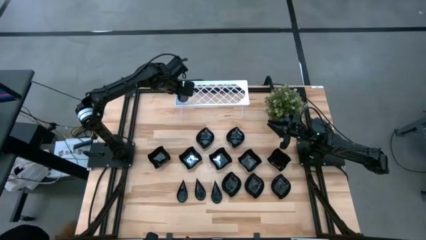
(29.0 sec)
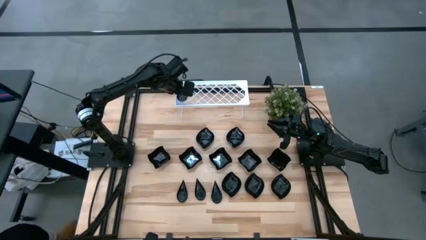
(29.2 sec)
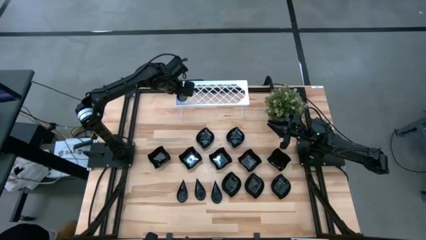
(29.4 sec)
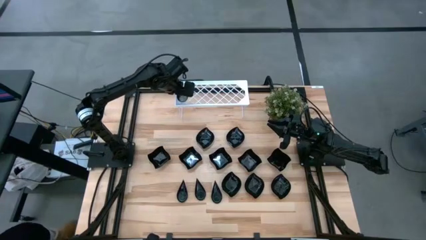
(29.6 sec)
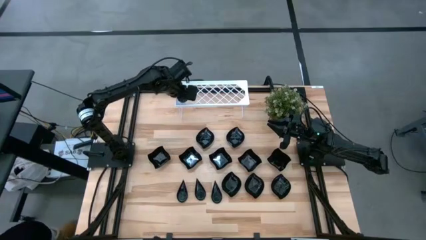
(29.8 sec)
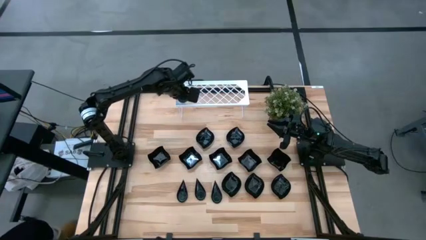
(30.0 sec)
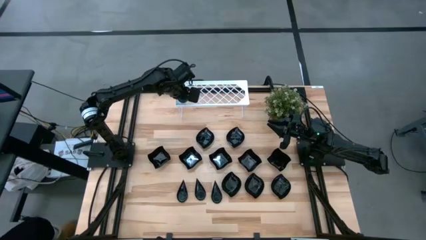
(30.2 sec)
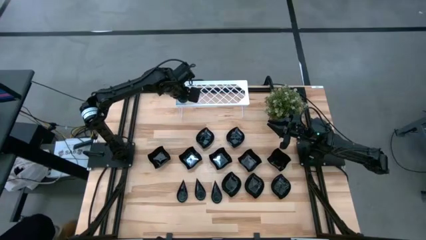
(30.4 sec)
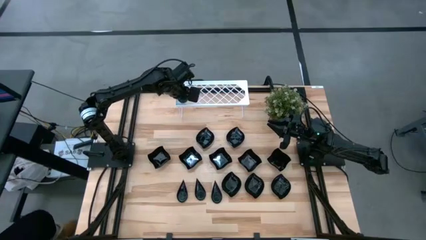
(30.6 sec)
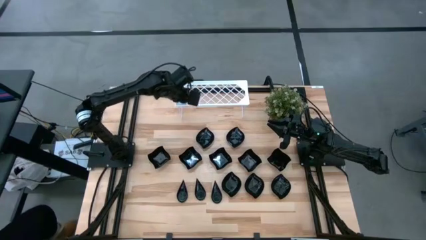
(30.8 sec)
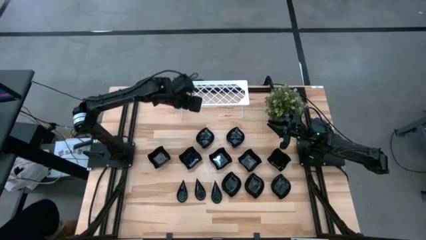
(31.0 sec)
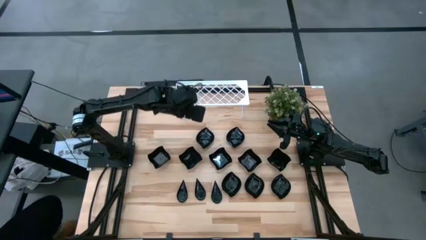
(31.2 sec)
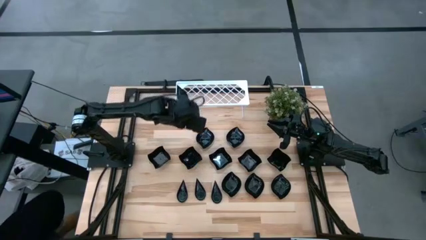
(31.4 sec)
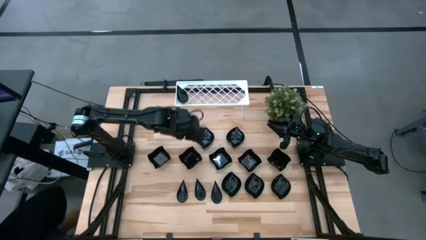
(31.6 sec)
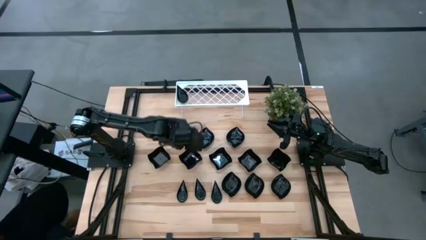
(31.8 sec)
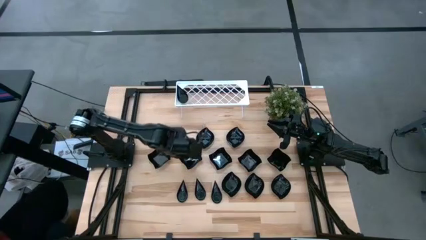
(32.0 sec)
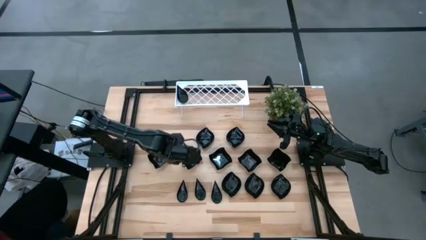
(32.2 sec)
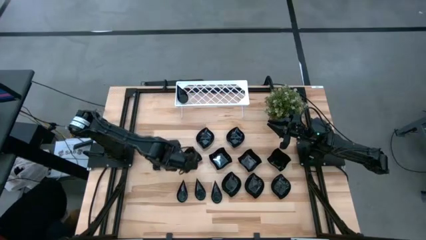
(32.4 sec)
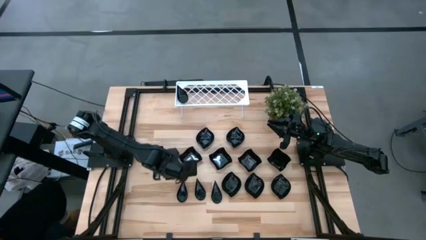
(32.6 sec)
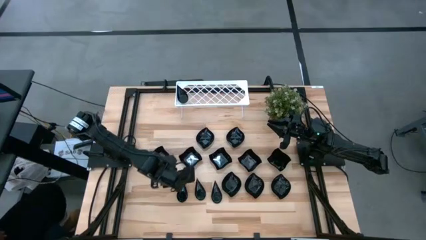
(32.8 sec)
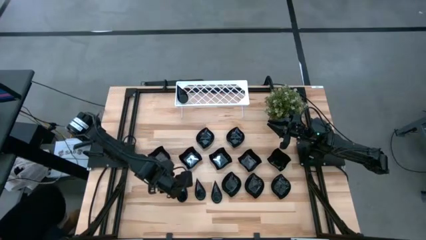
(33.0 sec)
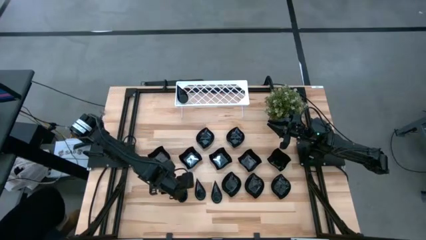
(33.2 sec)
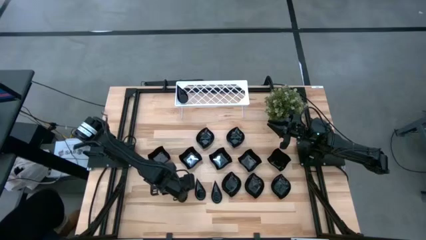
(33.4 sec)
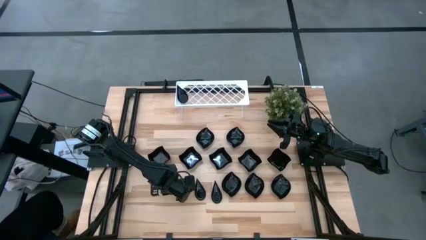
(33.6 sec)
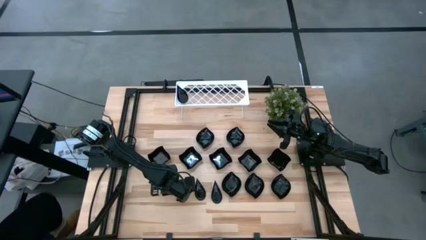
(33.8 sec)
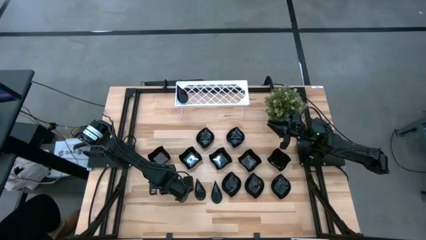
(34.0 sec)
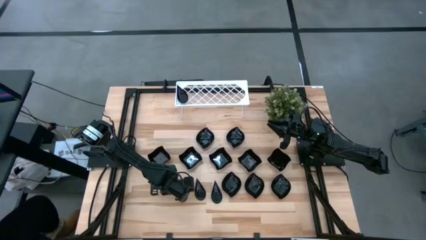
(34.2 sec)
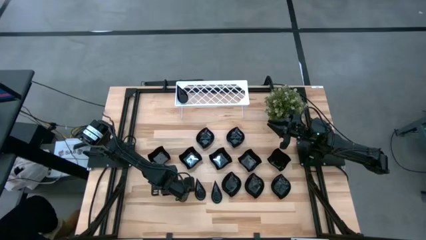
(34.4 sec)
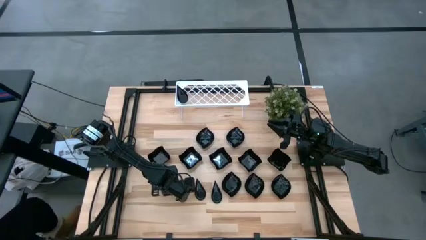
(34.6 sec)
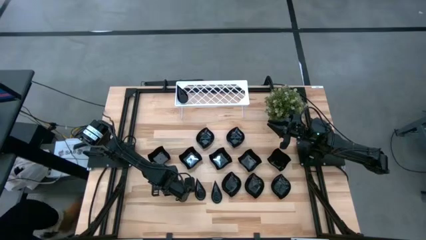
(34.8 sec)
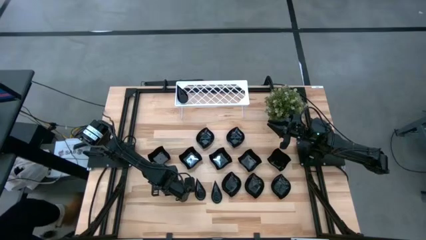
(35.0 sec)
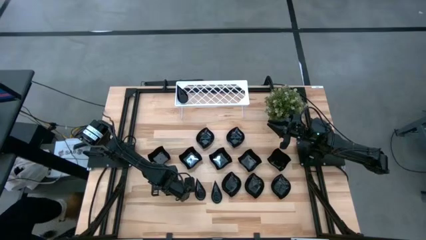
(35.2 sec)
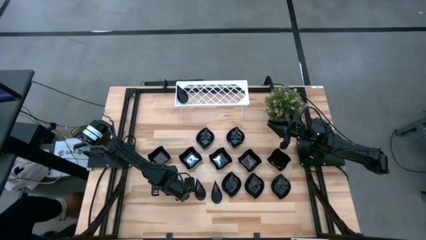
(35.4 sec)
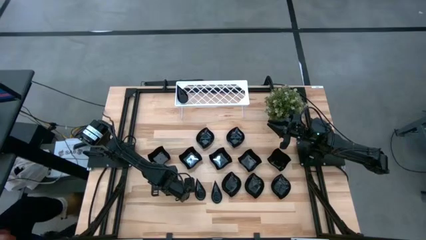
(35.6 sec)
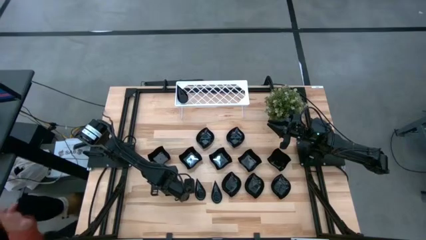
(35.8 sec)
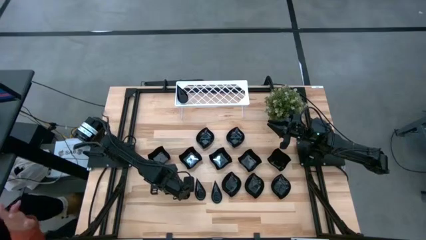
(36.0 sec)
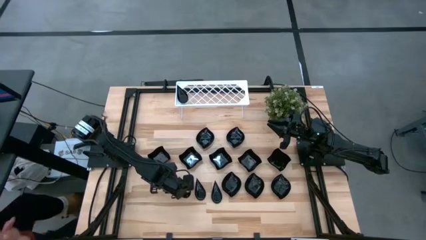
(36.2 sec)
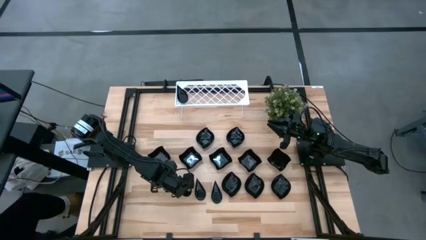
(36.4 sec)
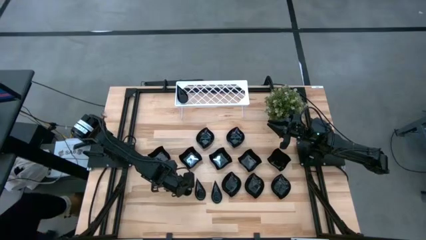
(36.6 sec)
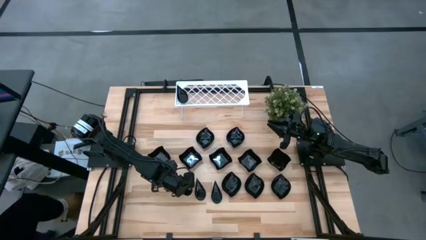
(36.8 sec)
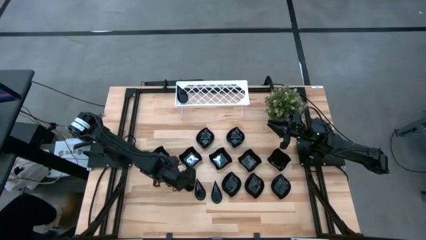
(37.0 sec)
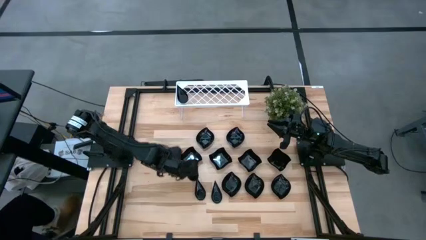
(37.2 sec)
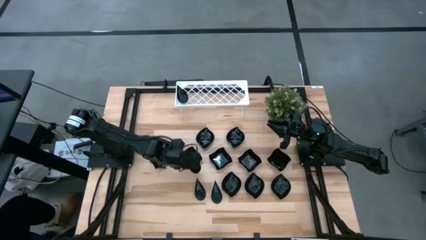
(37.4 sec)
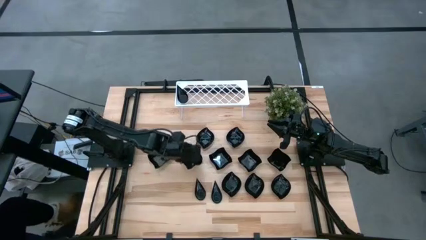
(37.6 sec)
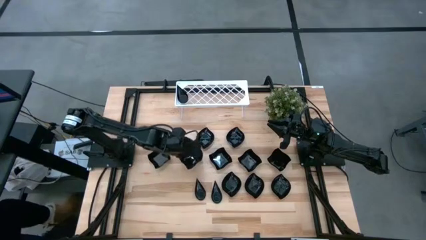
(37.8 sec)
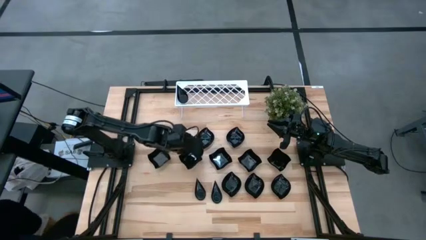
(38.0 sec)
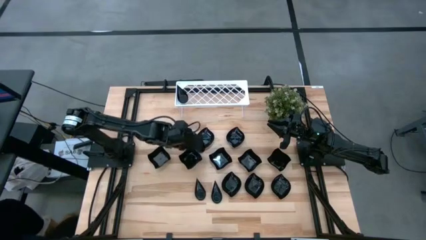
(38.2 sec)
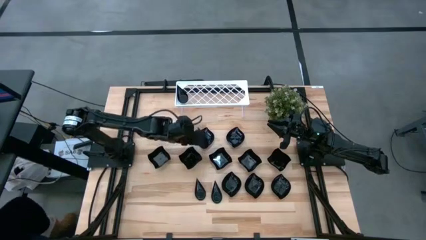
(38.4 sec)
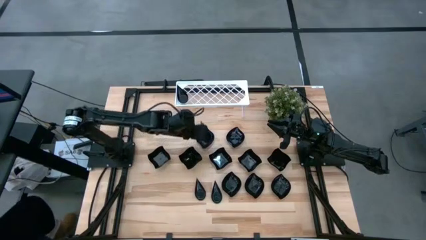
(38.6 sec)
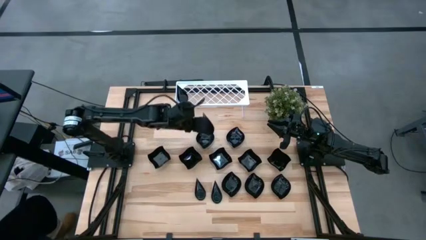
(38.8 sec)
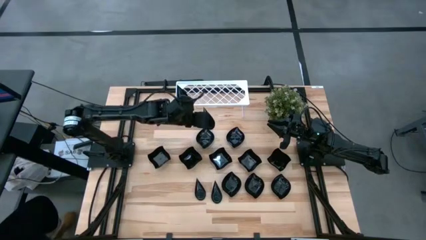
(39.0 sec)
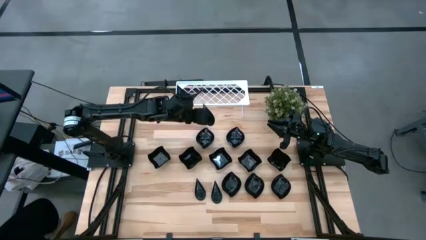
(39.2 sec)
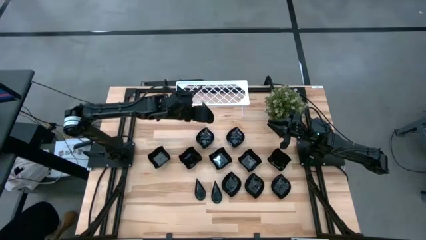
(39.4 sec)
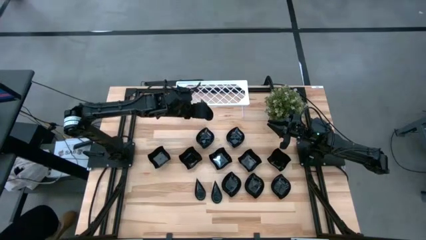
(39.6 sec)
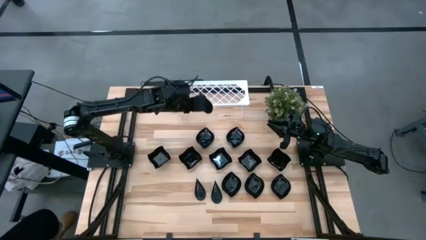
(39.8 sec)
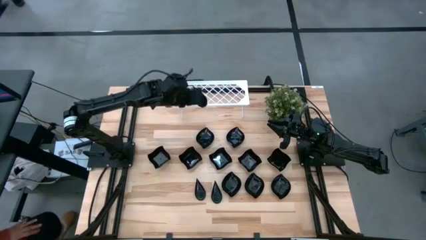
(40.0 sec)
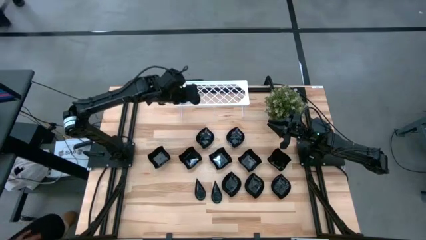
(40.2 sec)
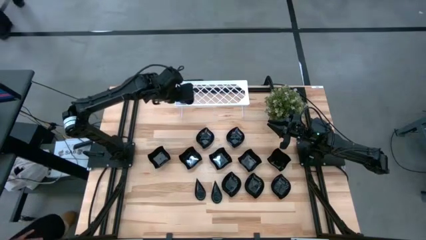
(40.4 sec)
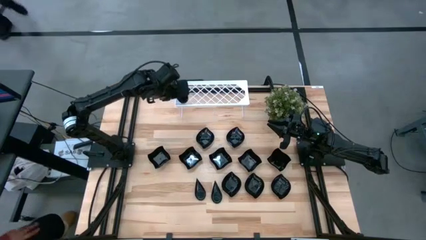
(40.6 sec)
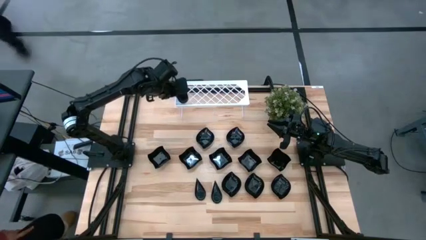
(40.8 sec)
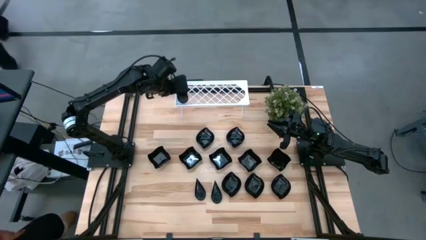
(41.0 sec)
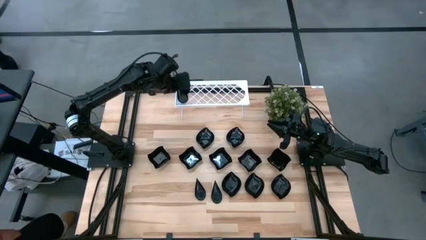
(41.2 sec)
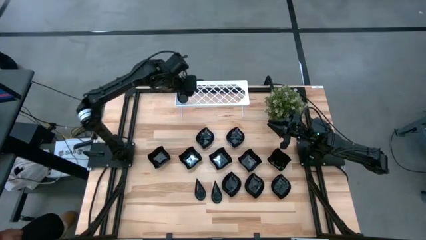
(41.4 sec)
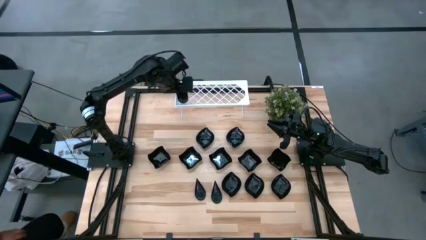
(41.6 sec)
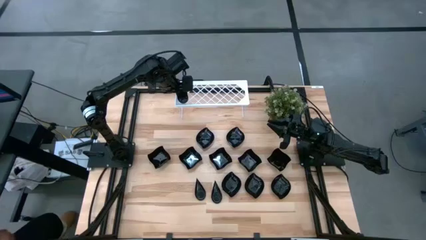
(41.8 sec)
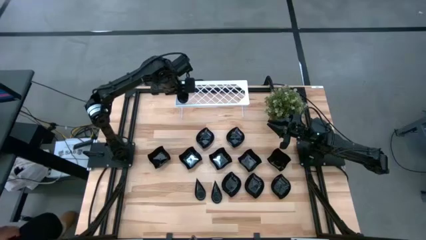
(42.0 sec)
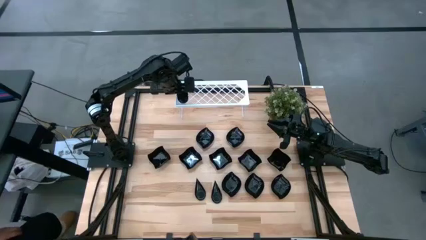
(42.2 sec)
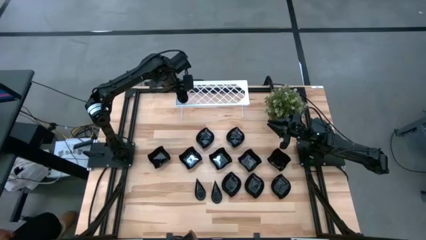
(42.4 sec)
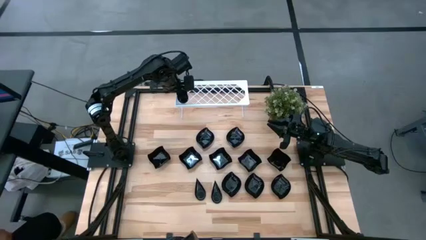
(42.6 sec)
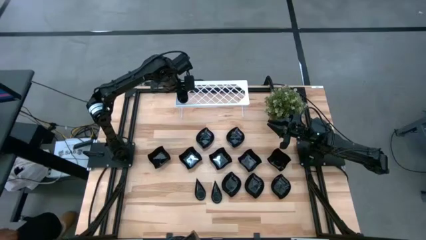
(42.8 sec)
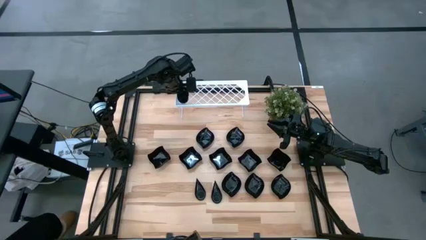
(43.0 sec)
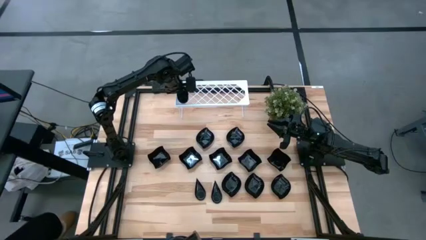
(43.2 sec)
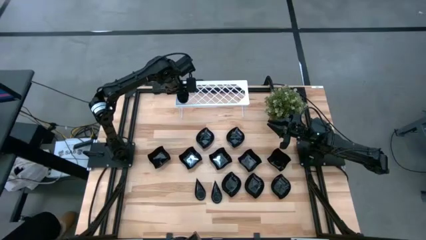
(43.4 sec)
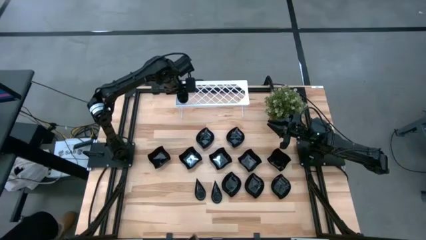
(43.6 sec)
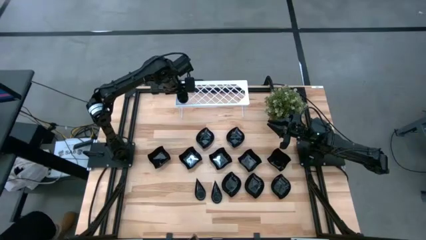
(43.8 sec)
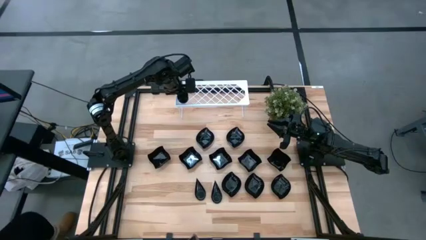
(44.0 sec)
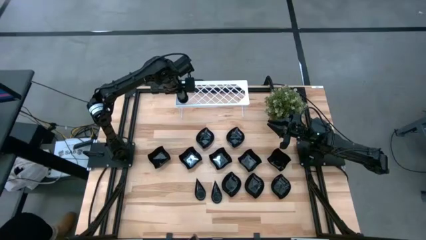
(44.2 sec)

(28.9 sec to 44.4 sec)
Task: Pick & Place Mini shaped plates
Stack the drop-shaped plate on top of the drop-shaped plate on the shelf
